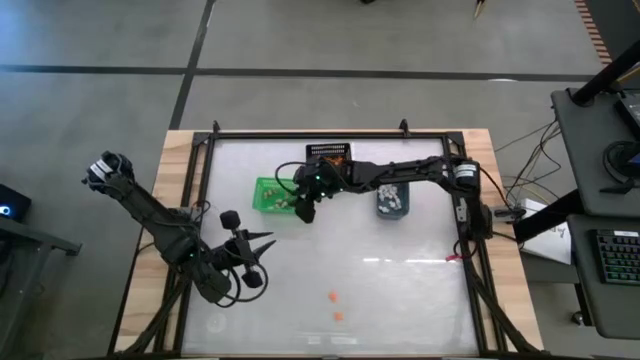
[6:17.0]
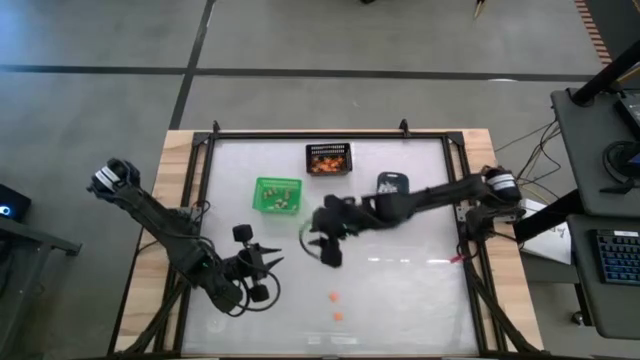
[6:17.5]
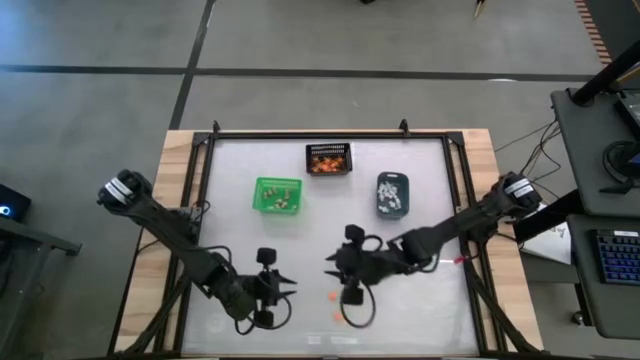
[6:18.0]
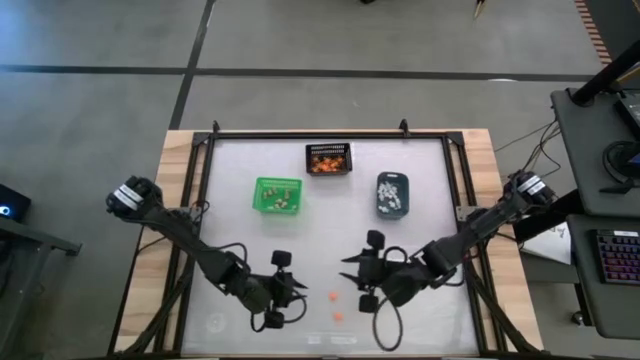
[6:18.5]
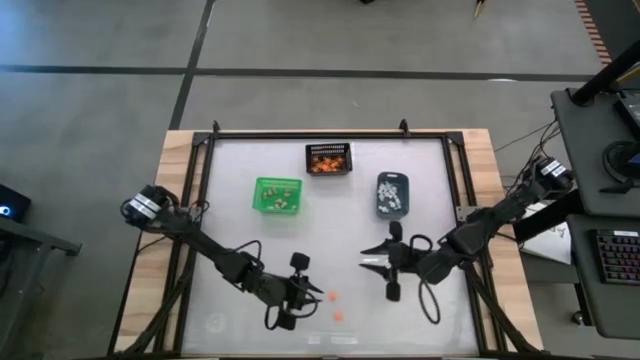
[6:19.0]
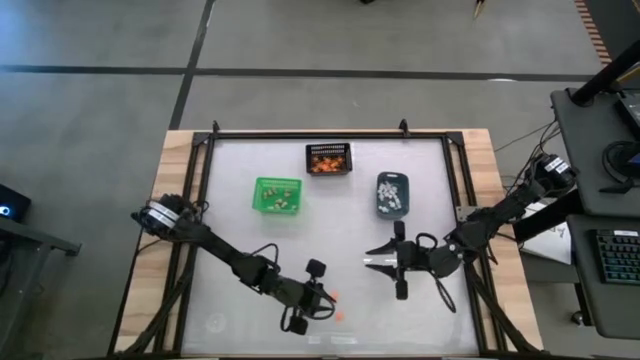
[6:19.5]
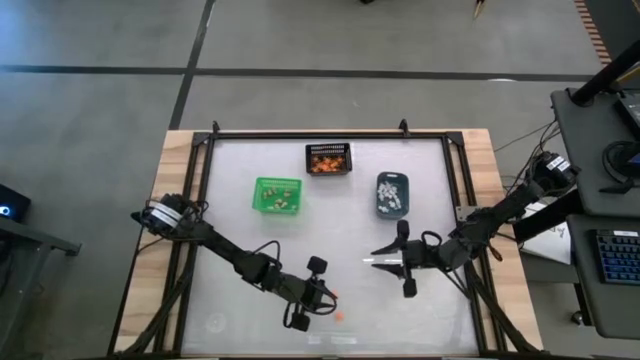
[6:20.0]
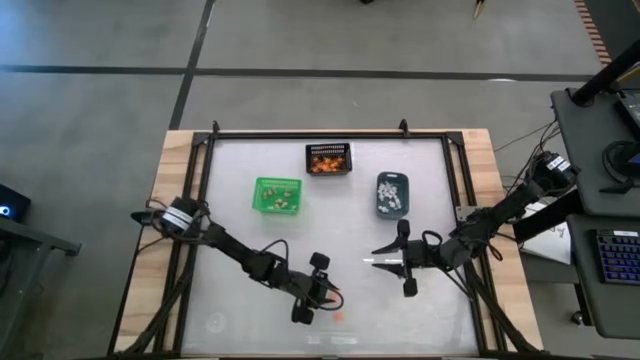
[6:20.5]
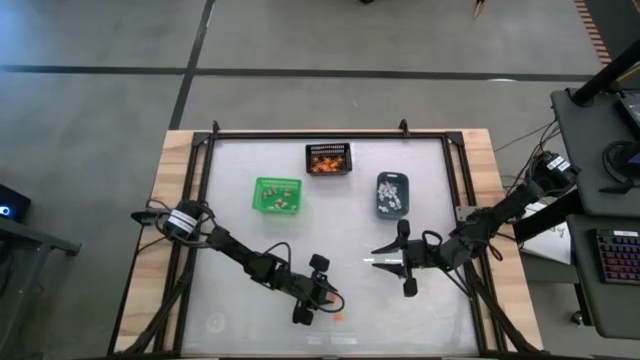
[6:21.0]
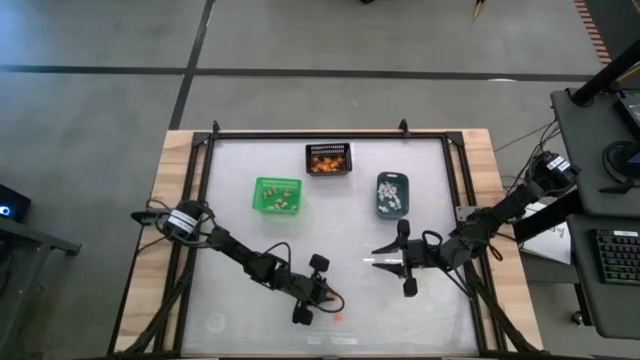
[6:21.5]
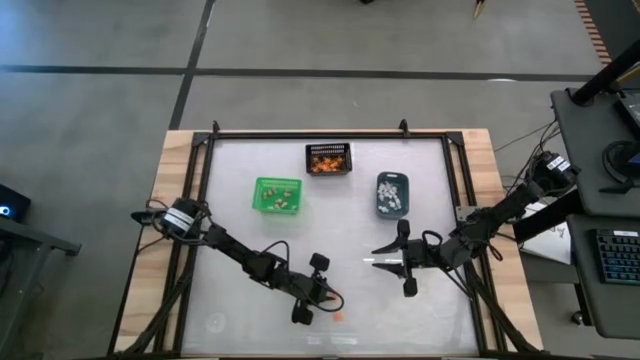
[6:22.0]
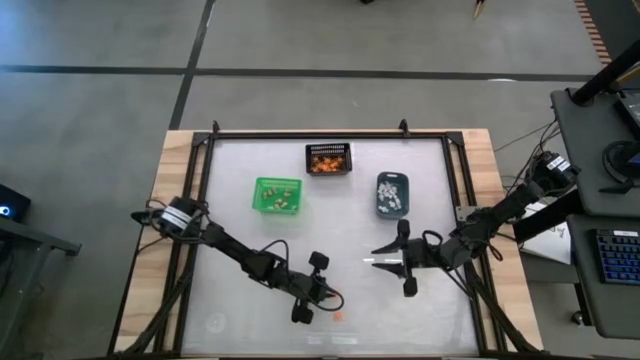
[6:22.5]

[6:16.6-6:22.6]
Task: Sort Halloween decoration
Put the orange spider toy into the black bin

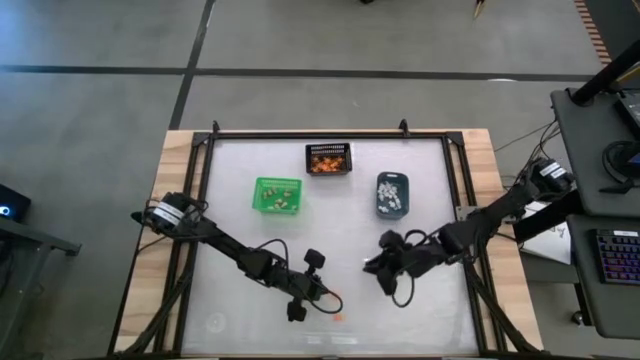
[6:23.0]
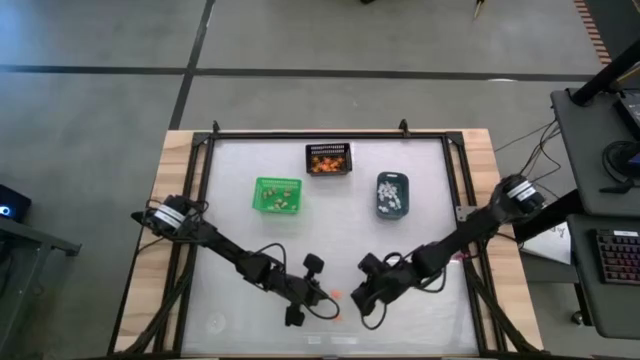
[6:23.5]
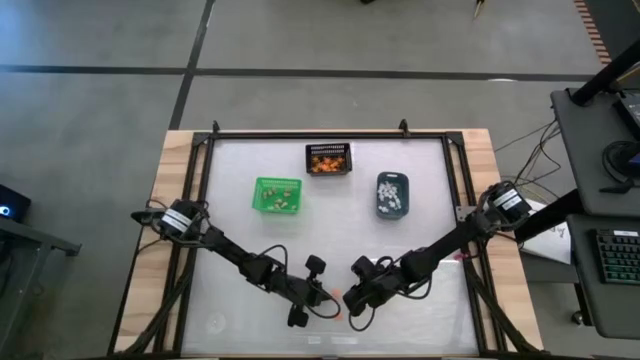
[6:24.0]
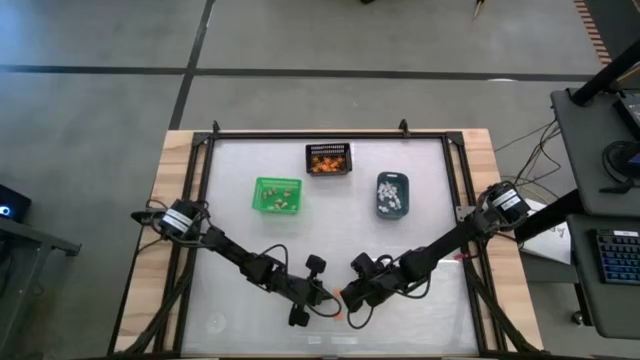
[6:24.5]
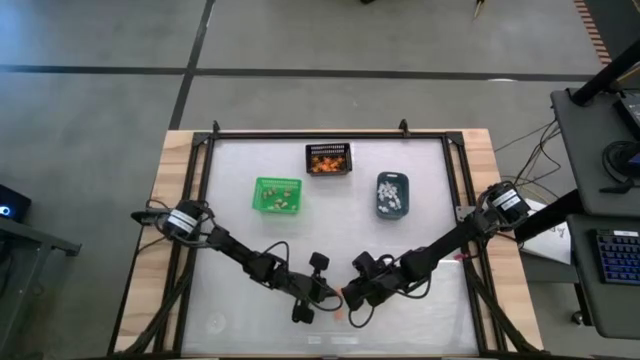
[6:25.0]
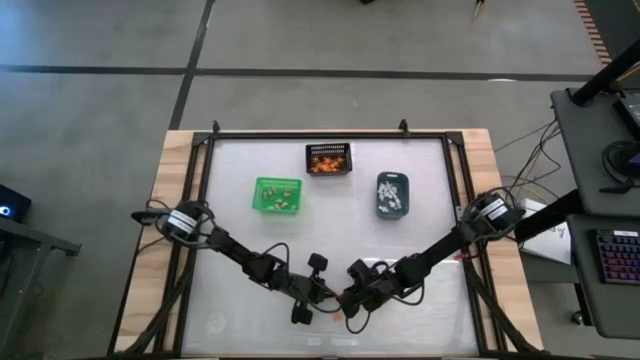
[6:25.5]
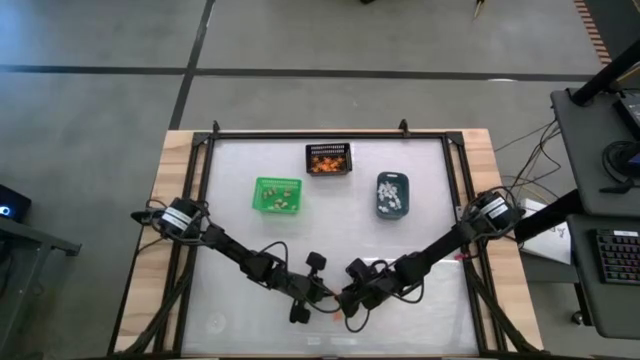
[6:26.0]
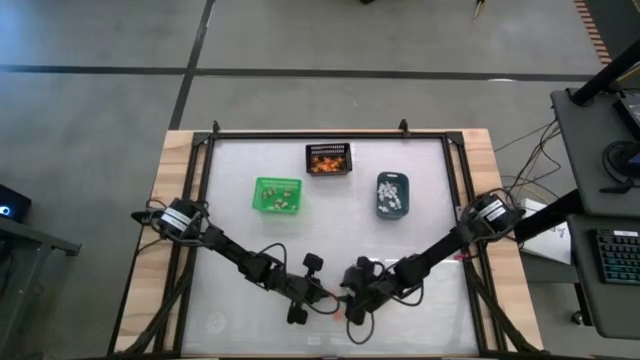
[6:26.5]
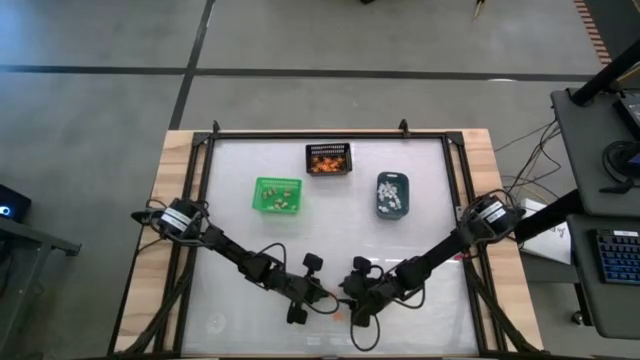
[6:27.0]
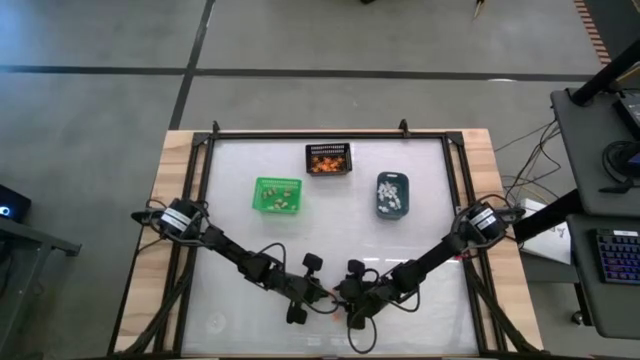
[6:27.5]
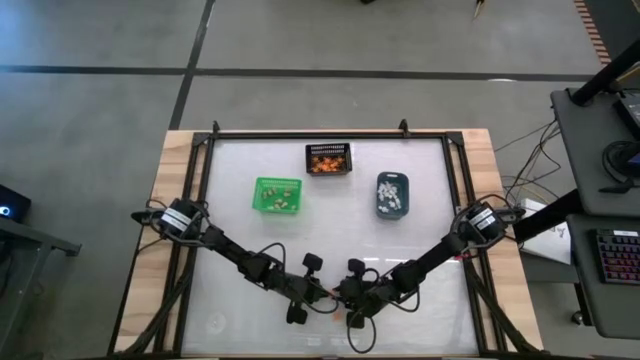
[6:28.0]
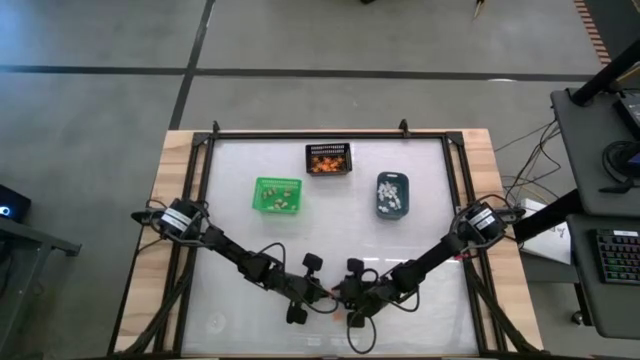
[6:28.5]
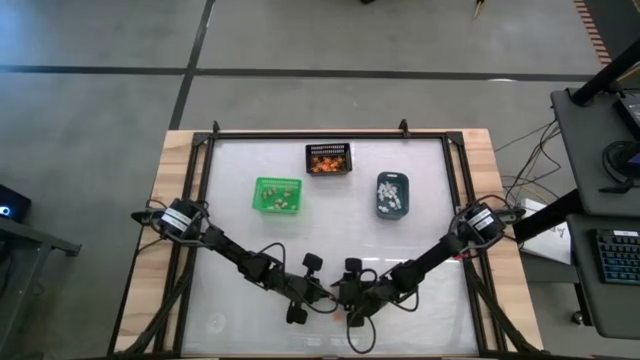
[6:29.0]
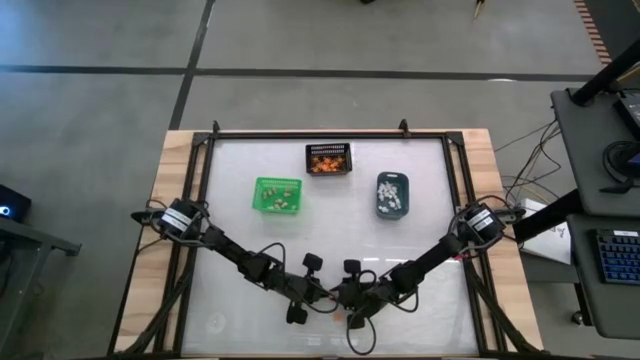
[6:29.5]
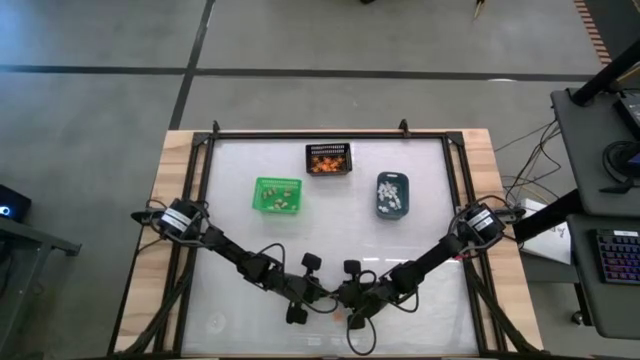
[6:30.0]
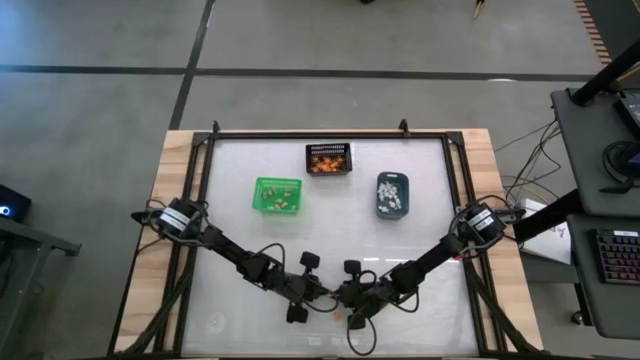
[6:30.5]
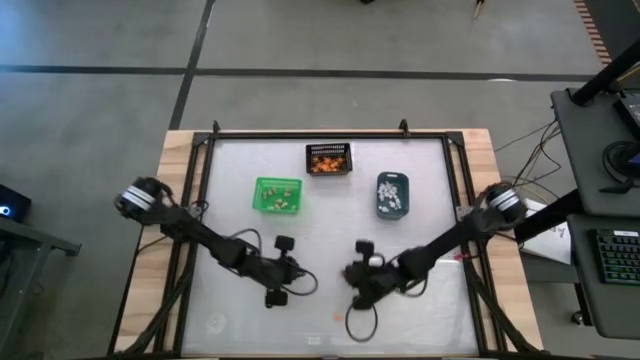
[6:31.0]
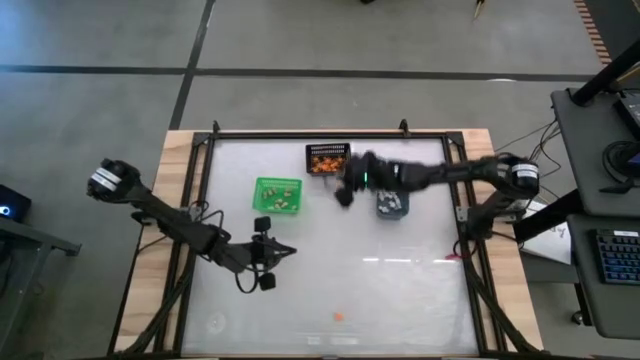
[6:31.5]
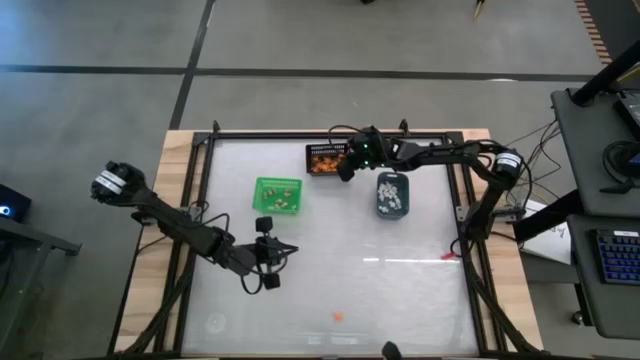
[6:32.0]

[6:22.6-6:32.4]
Put the orange spider toy into the black bin

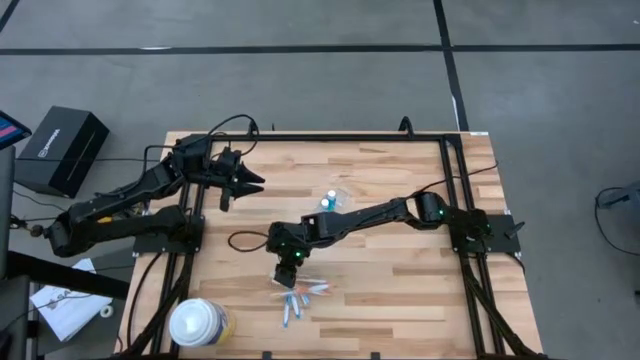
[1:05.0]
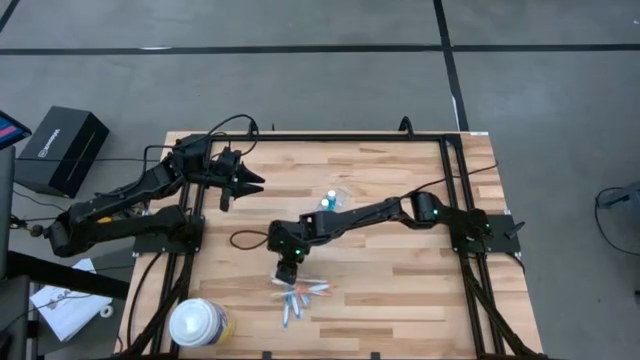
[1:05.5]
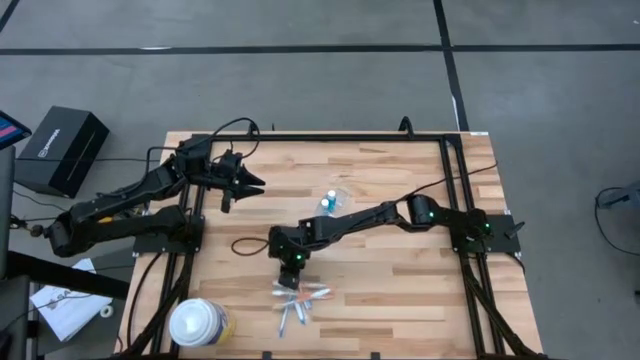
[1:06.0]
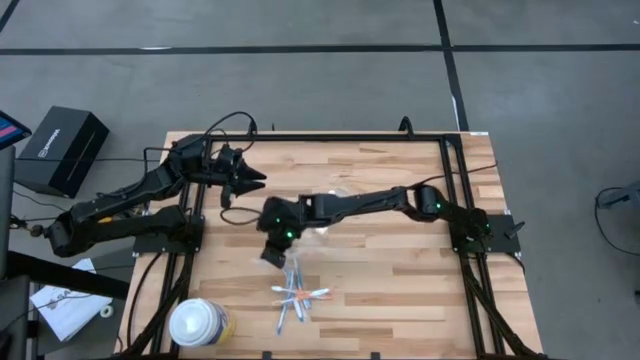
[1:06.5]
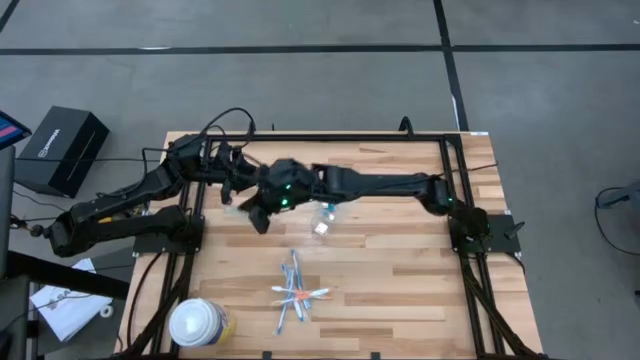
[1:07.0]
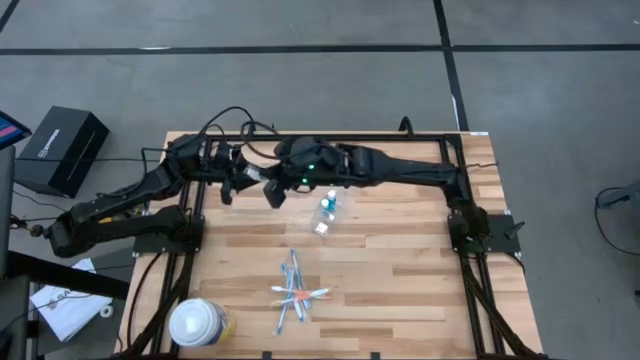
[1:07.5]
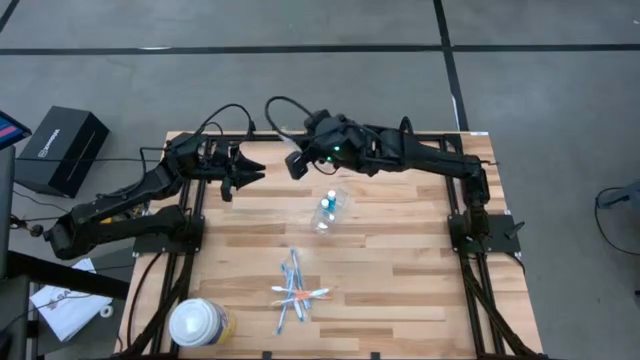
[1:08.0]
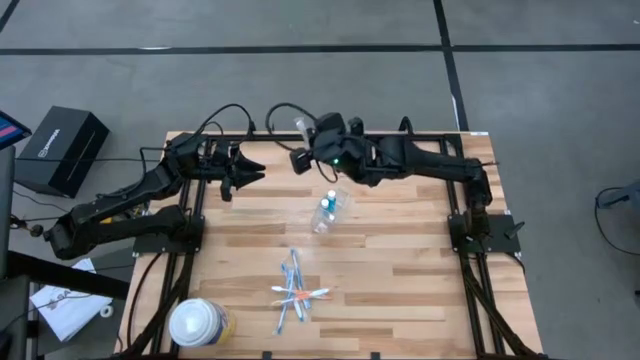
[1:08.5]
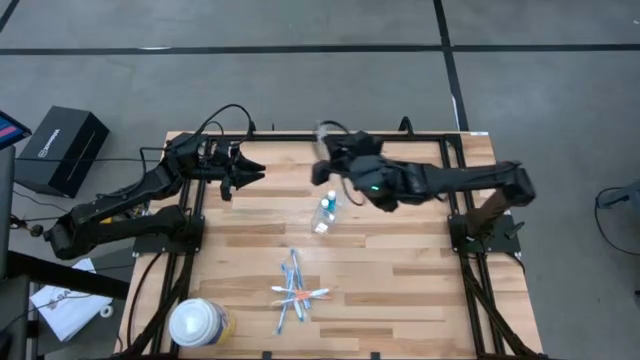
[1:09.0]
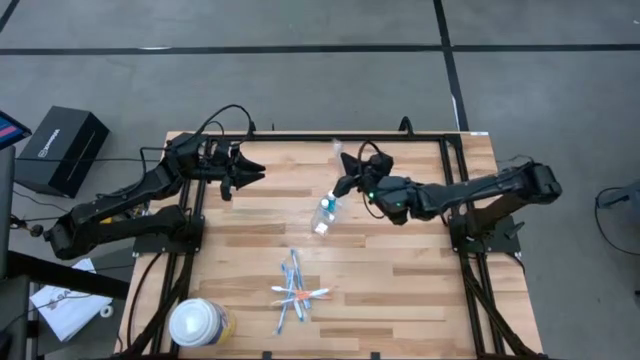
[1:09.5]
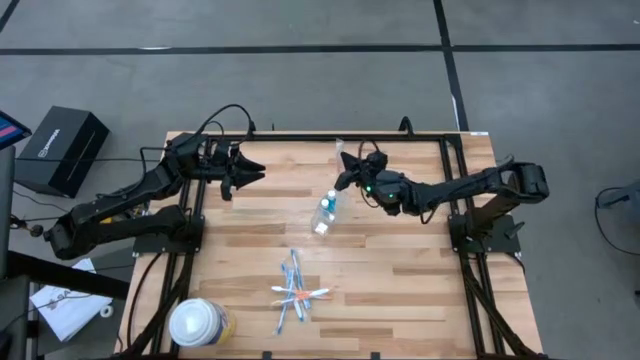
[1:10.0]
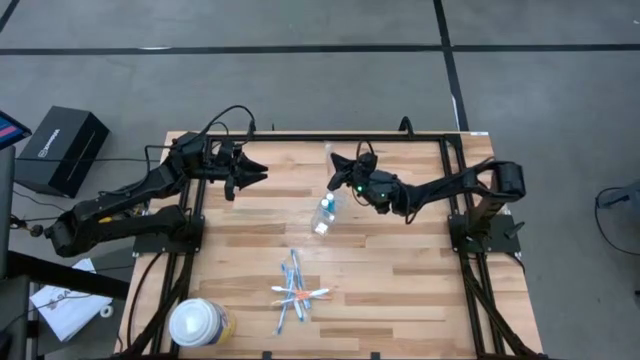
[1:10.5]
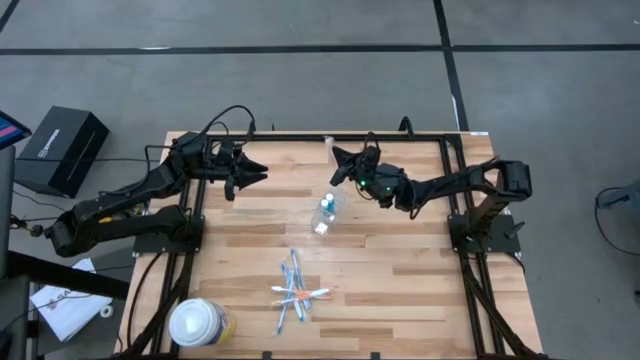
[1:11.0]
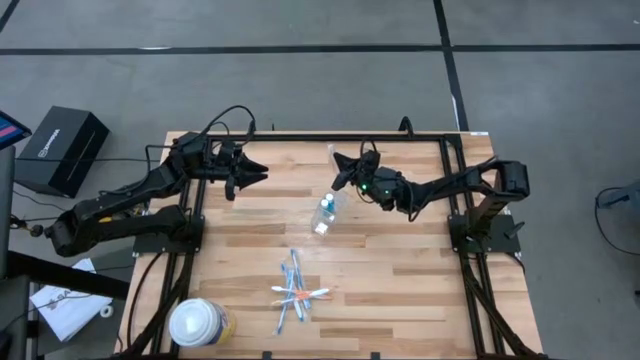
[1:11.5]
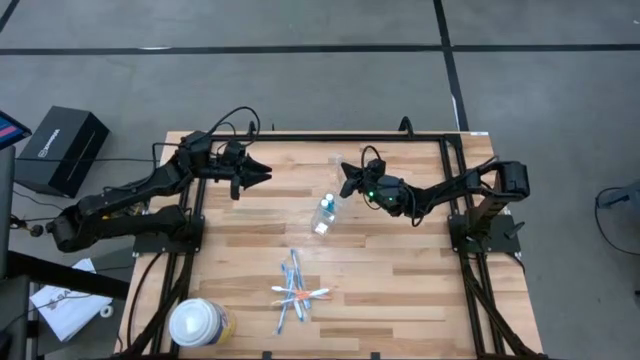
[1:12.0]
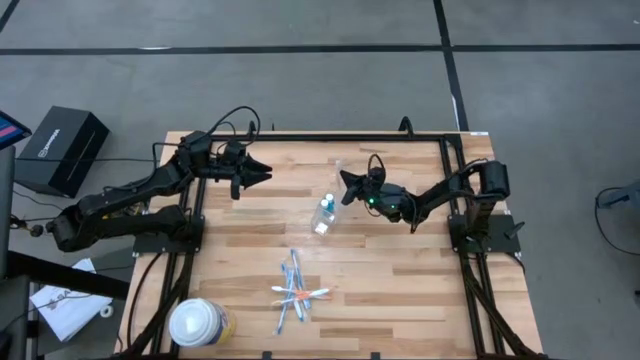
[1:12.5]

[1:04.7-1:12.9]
Task: Pick & Place toothbrushing station
Put the bottom orange toothbrush into the right section of the transparent organizer
